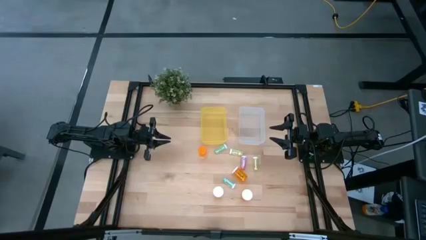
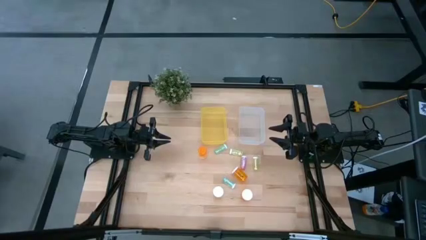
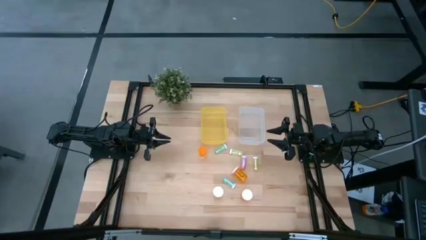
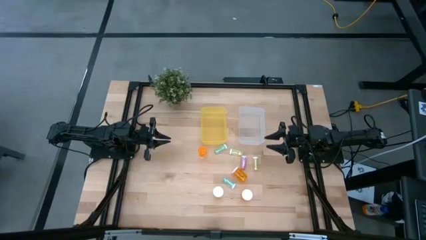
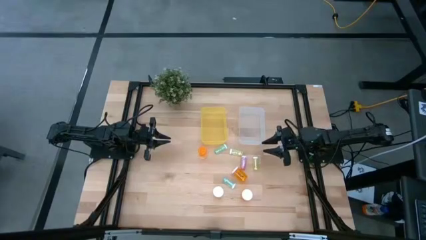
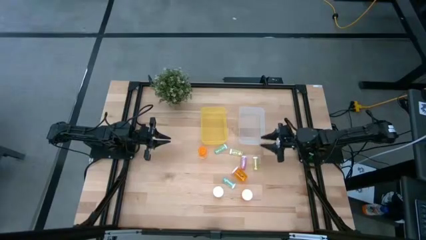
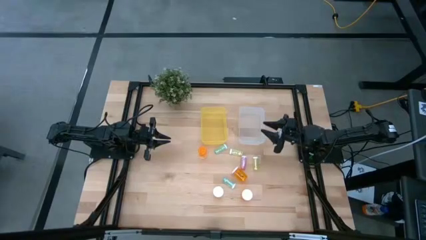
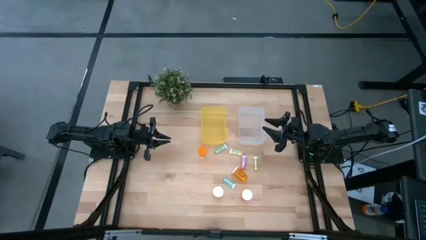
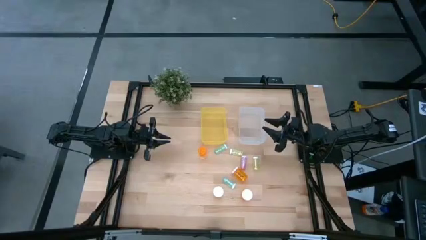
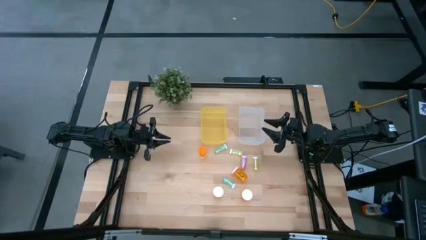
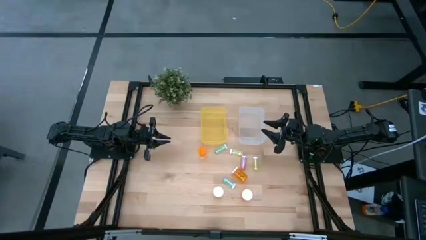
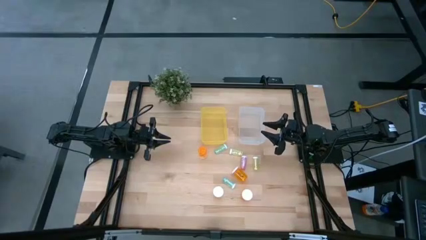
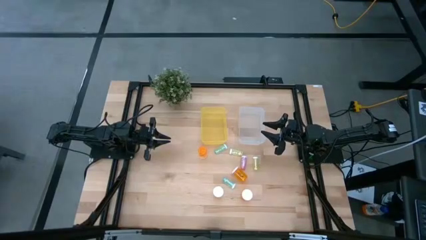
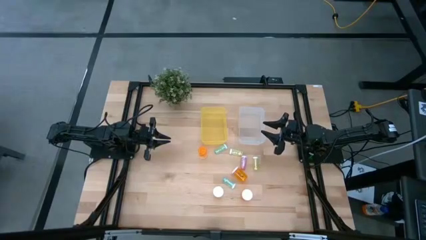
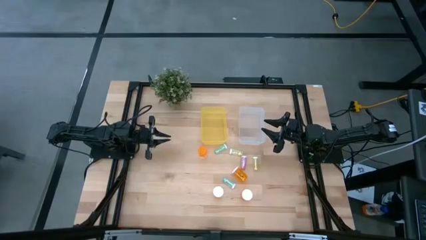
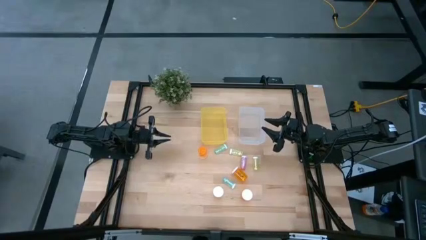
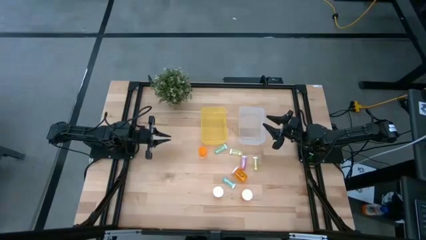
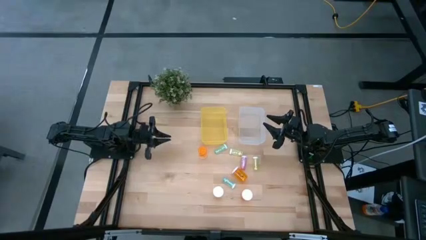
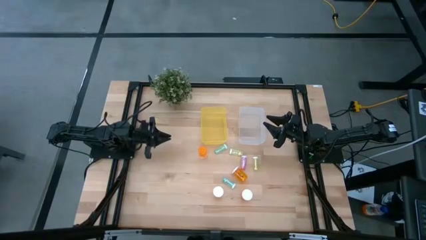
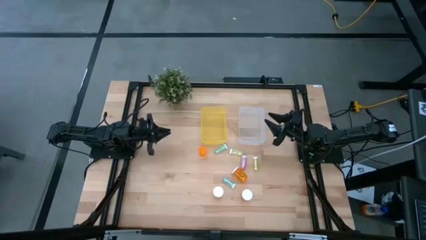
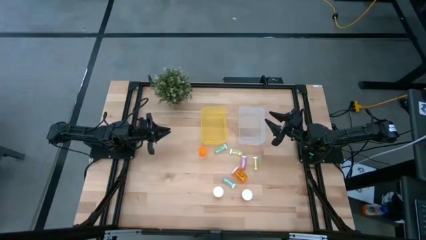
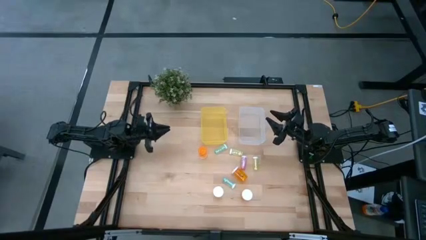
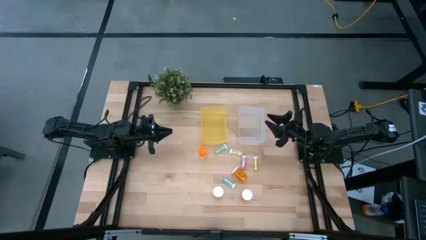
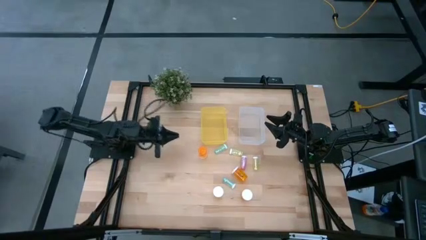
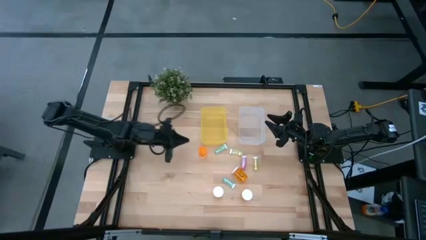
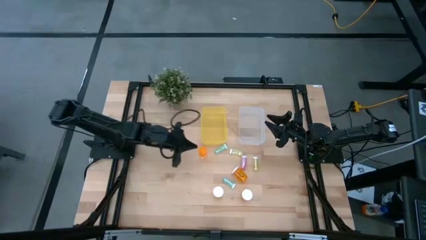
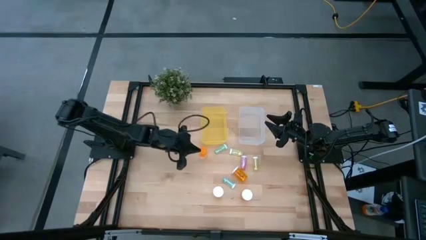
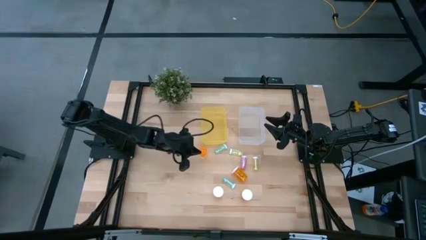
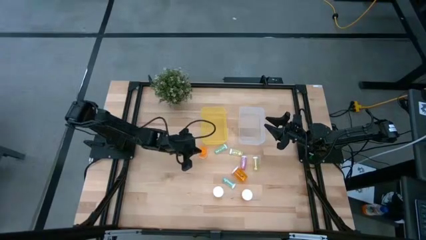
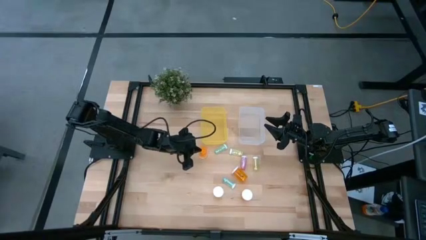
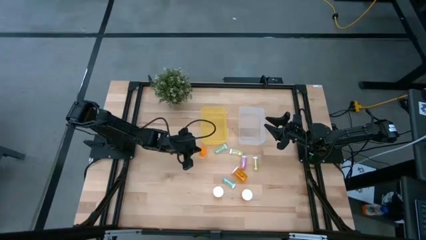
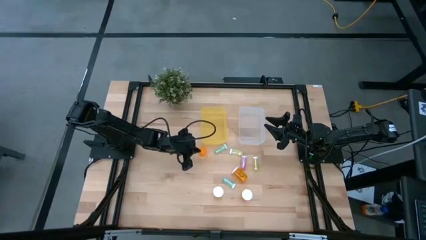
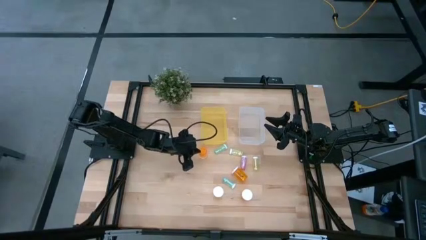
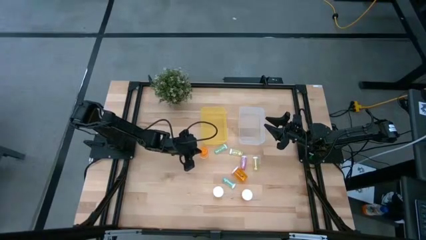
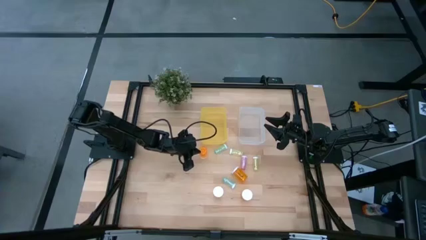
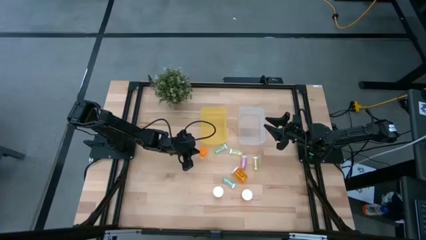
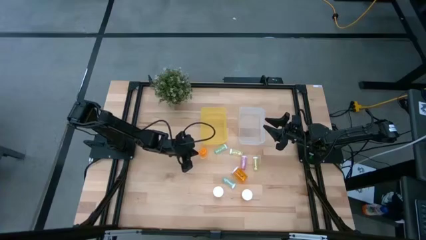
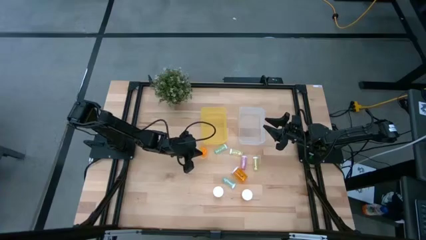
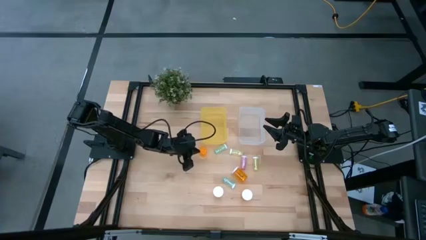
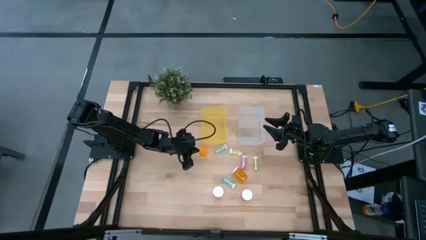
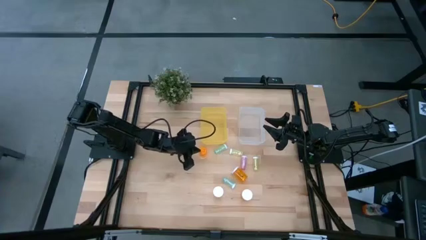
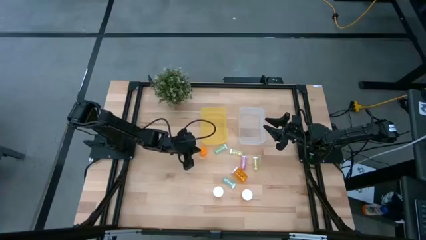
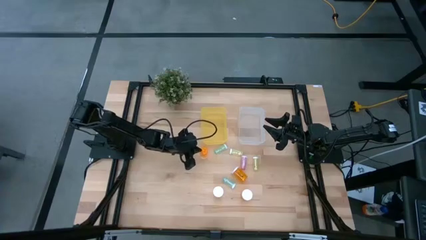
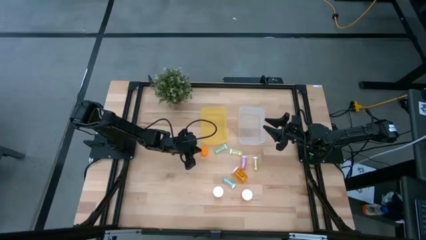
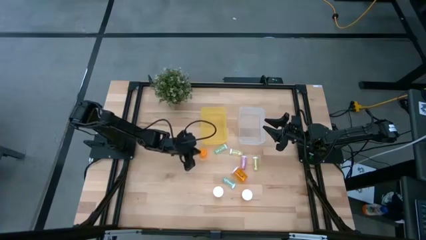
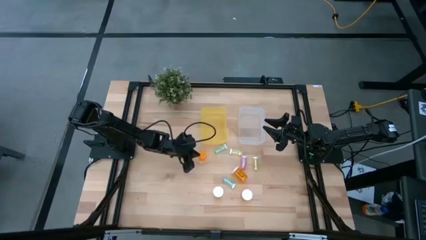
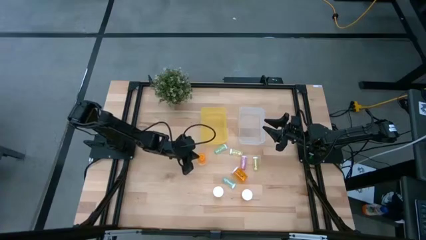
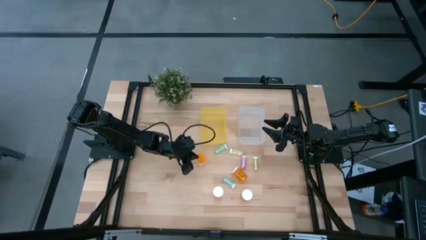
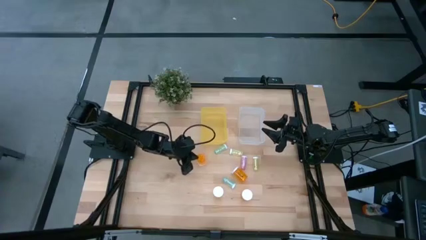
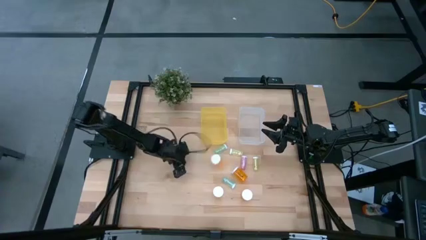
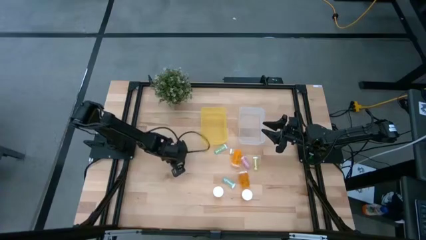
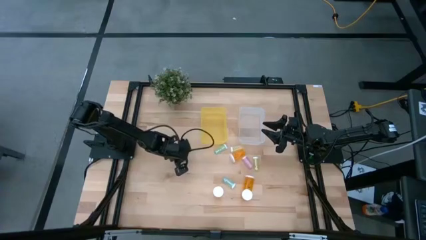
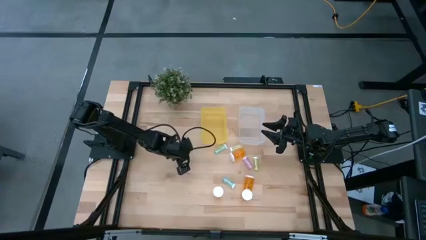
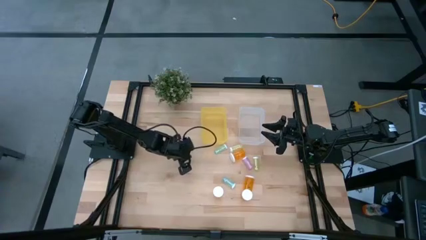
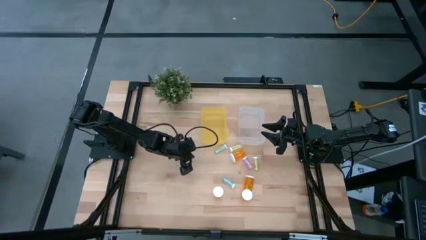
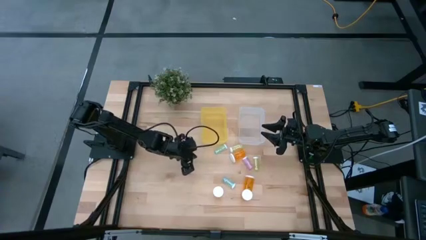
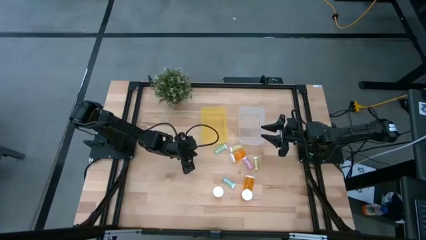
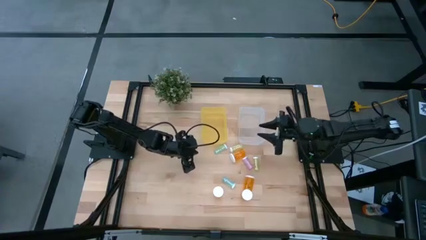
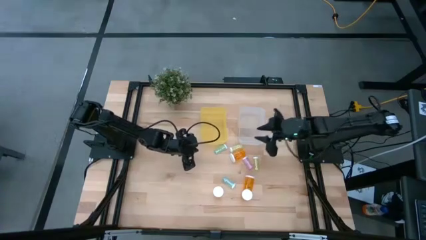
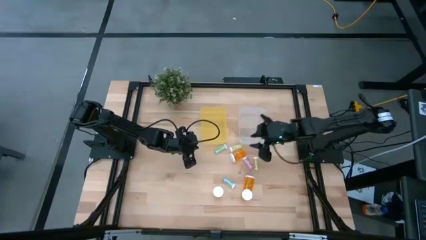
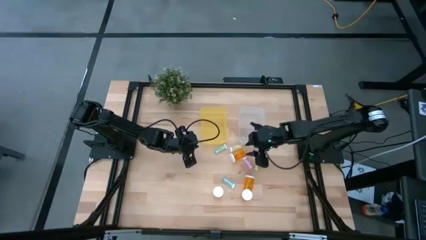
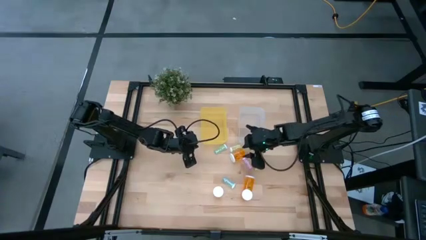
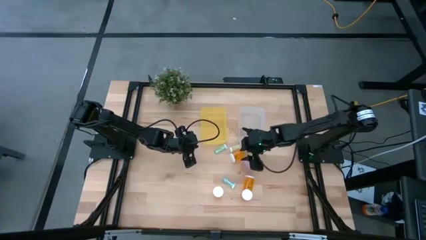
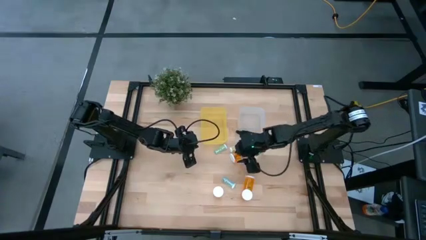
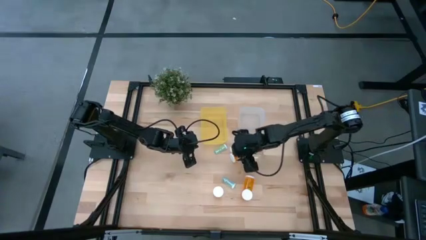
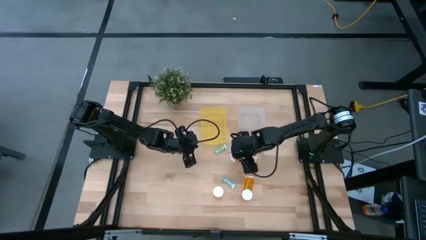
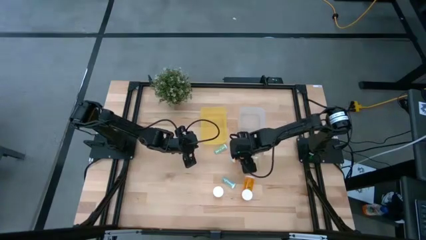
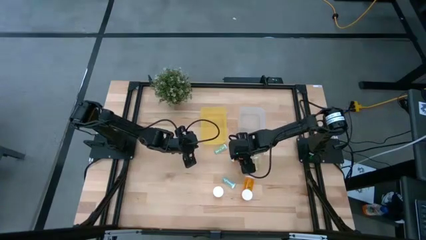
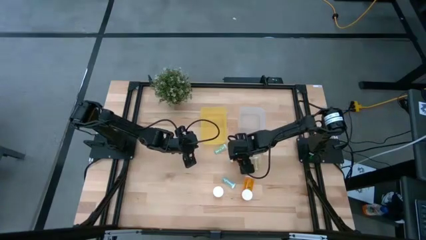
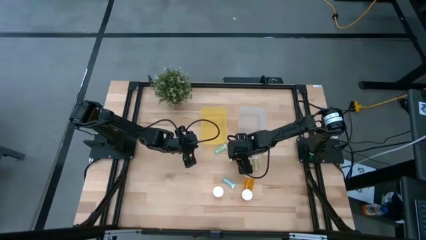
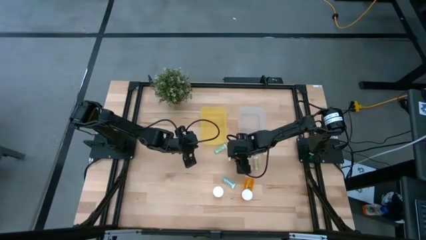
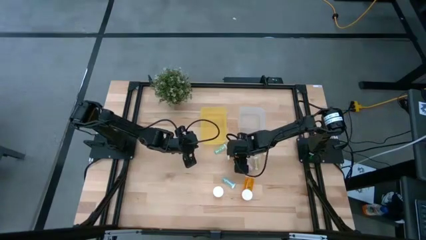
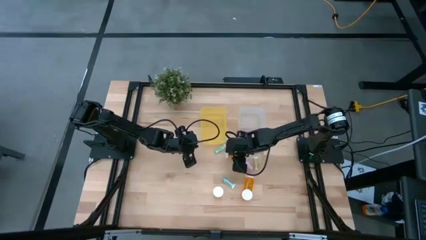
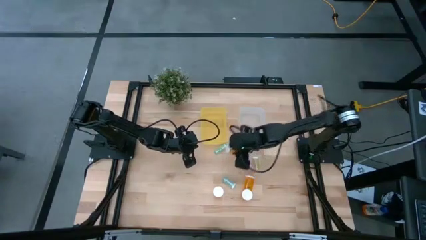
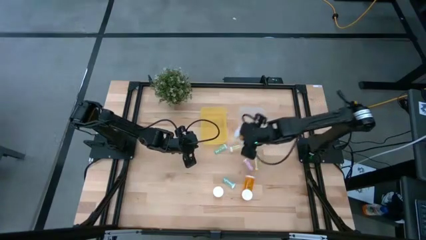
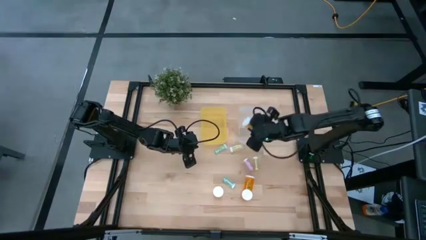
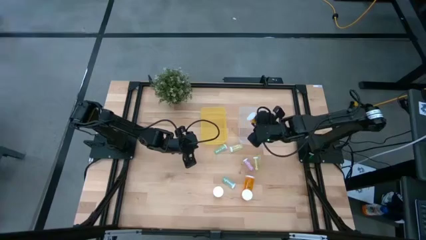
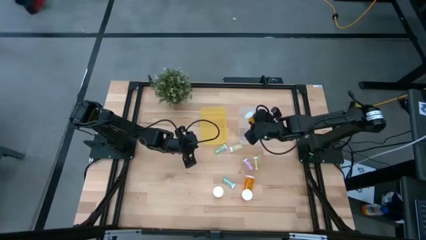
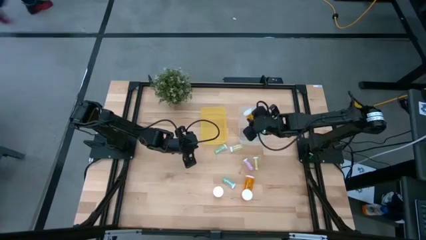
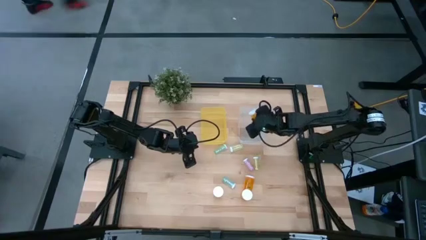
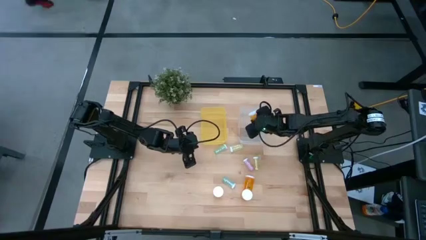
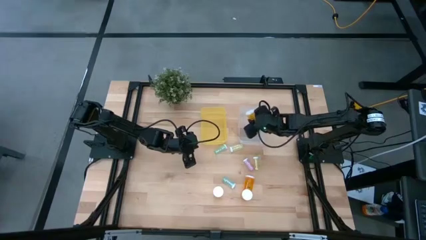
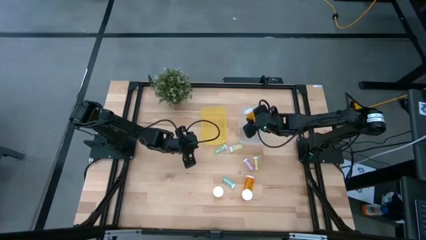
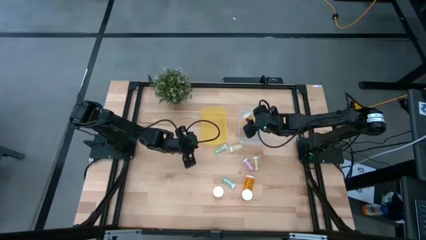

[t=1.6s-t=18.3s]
Task: Pick and place medicine bottles into bin by pill shape (circle, oval)
Put the large orange pill bottle into the transparent bin
